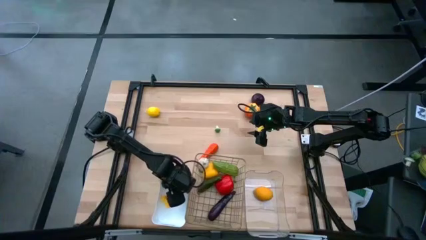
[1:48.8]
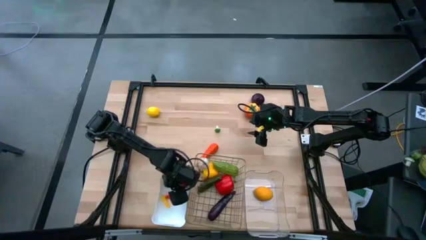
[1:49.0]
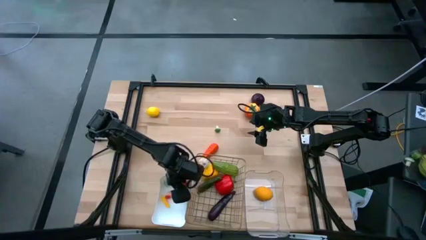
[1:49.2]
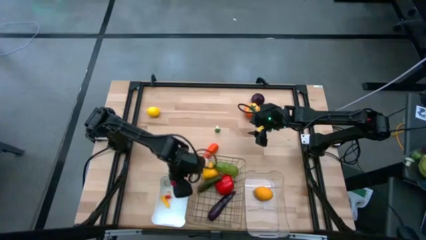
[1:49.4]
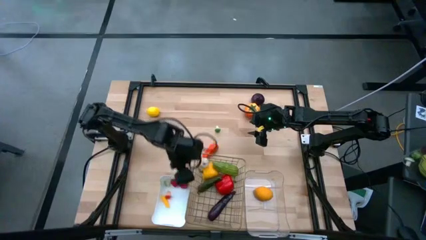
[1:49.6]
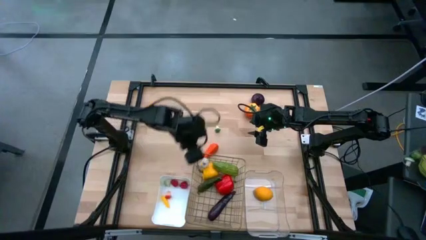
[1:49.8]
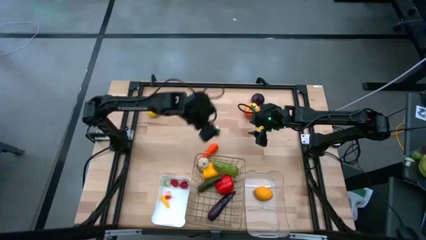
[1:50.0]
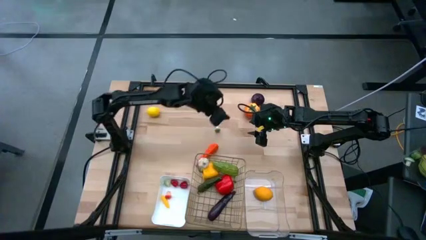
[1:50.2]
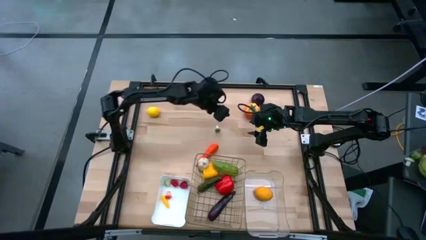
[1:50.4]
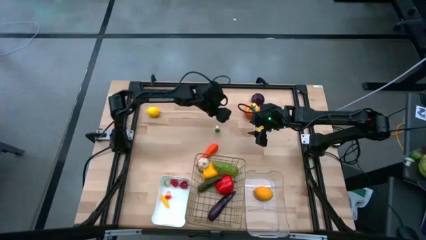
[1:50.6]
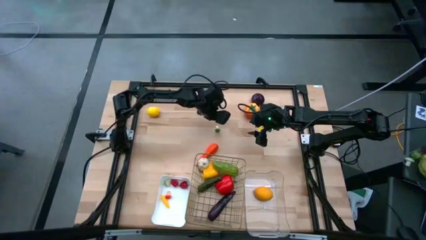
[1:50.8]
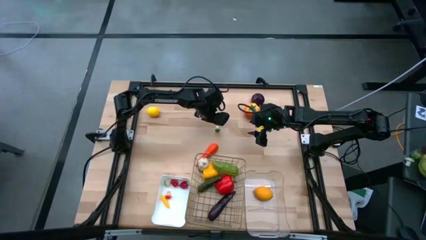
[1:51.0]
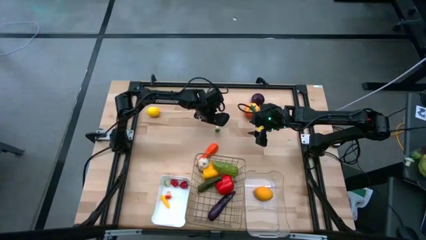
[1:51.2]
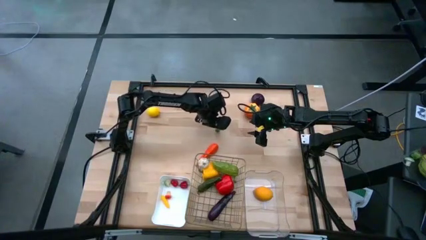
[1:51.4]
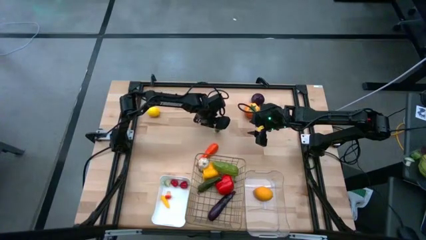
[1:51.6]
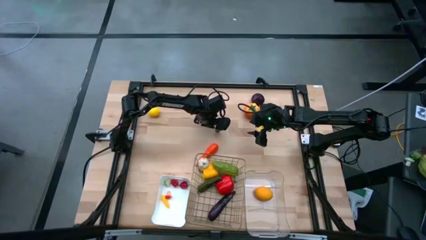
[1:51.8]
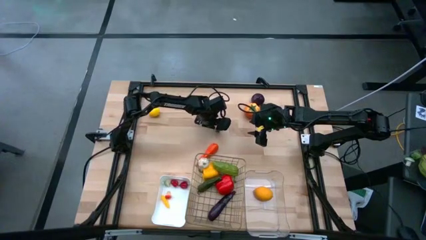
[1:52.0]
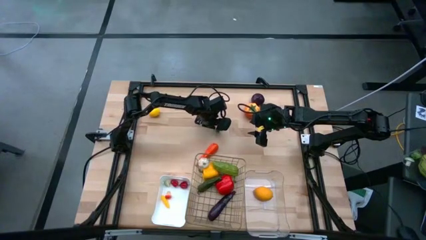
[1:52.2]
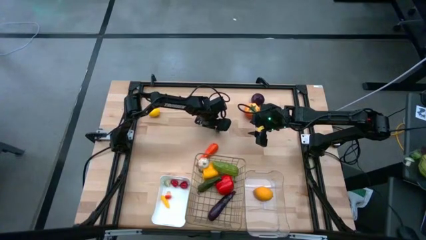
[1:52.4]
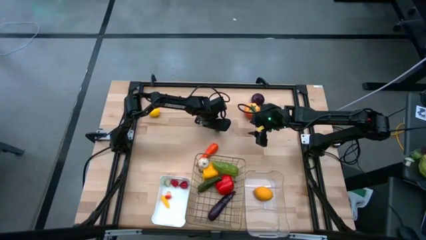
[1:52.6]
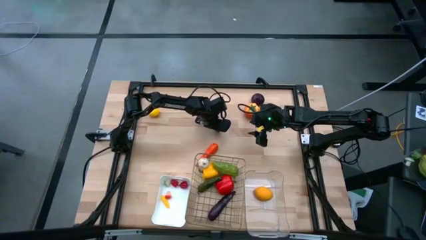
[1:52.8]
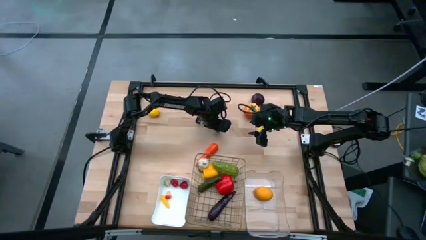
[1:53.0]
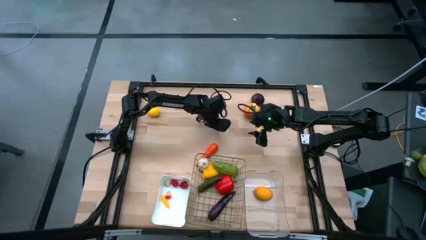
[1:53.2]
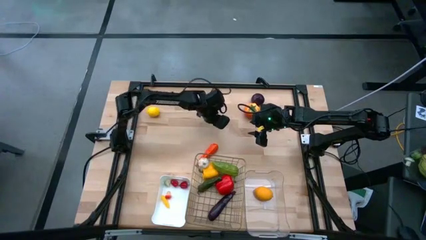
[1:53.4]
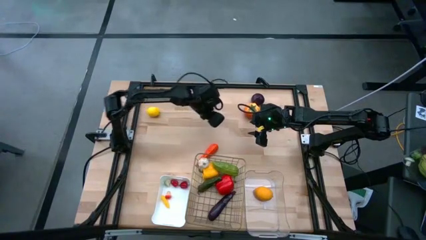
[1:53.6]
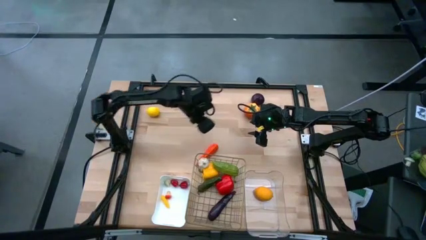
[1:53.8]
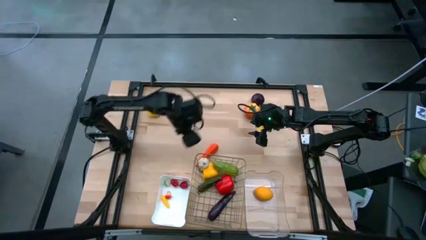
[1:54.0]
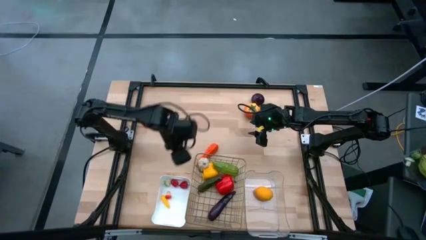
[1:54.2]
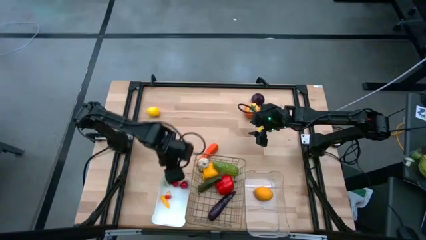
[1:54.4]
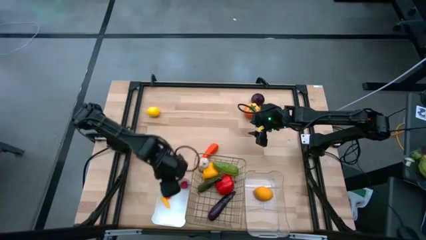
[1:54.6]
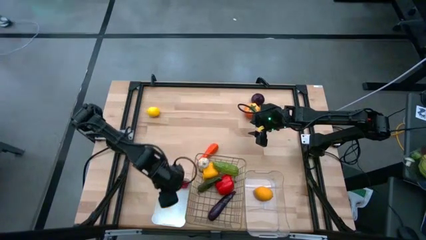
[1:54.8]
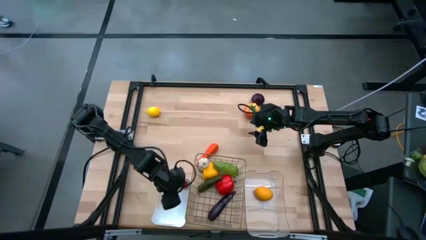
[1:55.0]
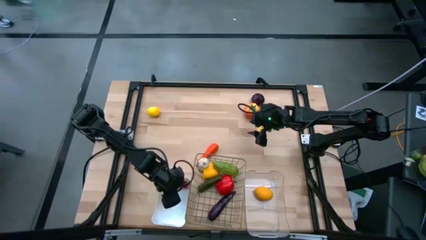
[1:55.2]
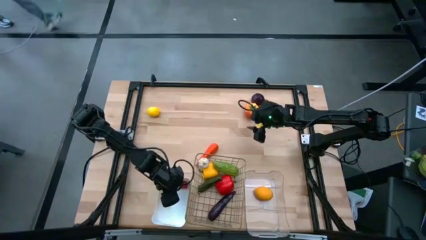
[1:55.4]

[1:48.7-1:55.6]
Task: Sort produce into baskets
Put the green mushroom into the white bin

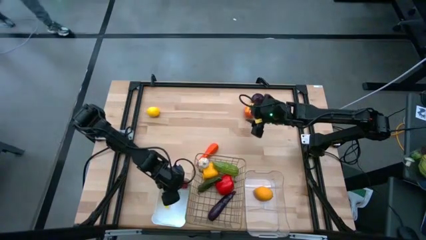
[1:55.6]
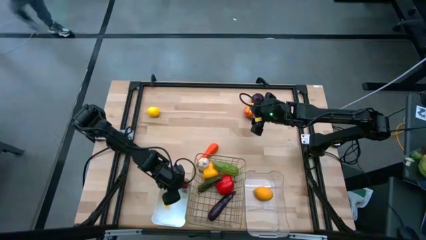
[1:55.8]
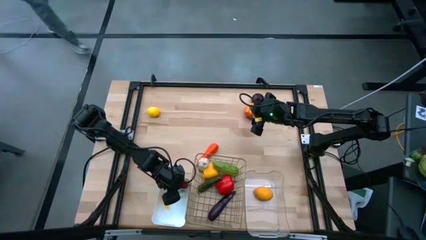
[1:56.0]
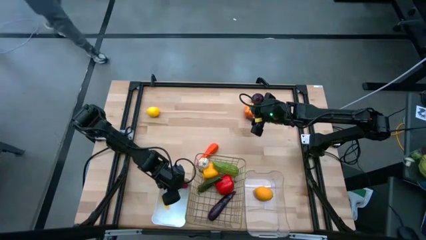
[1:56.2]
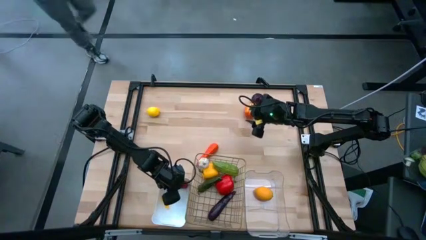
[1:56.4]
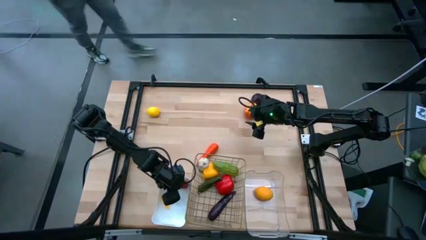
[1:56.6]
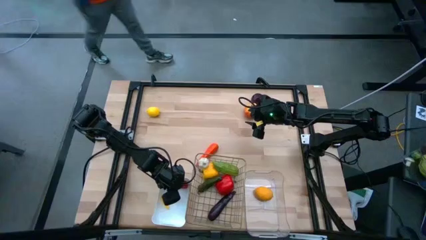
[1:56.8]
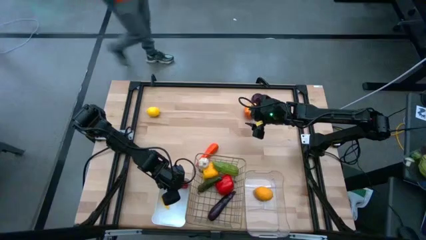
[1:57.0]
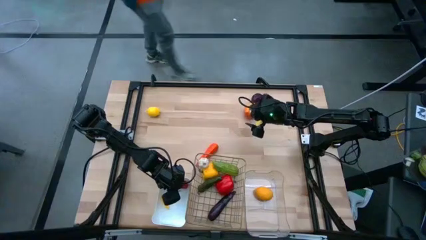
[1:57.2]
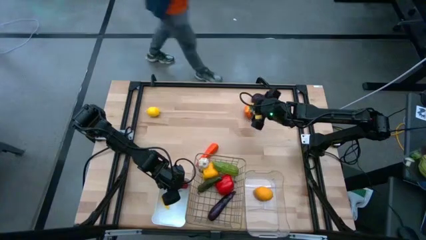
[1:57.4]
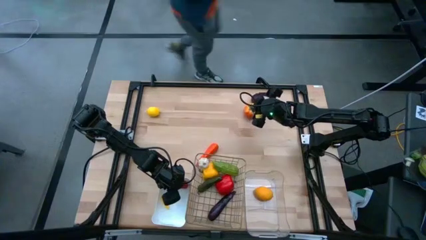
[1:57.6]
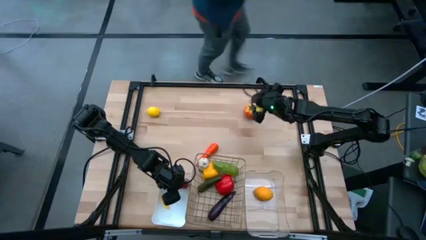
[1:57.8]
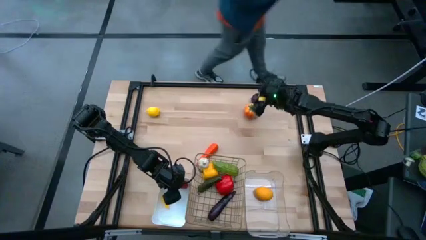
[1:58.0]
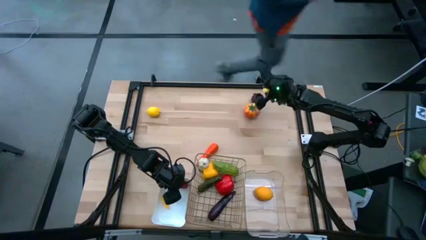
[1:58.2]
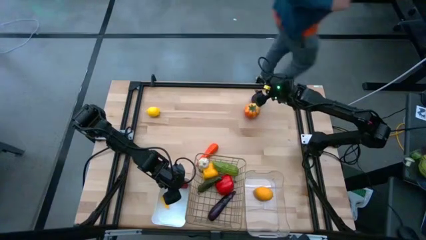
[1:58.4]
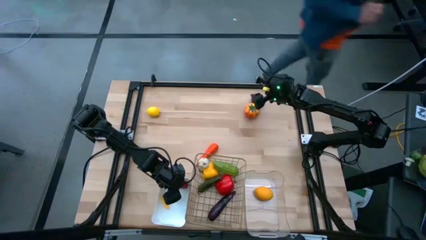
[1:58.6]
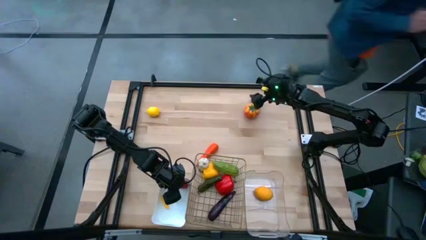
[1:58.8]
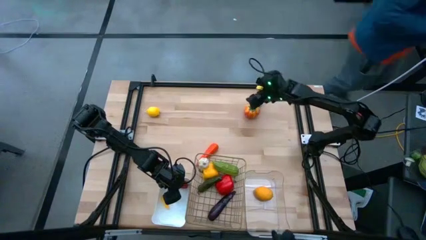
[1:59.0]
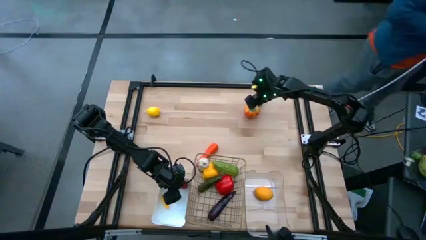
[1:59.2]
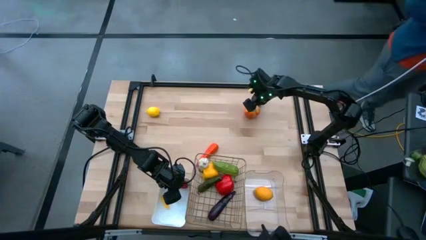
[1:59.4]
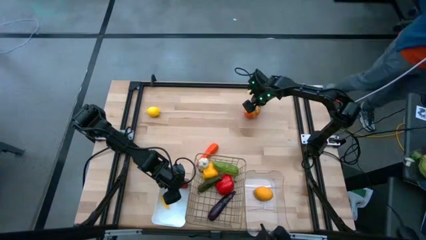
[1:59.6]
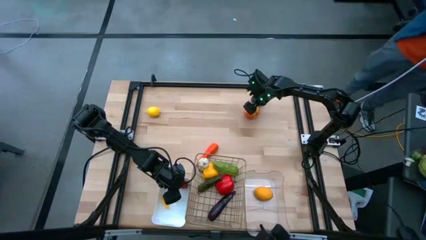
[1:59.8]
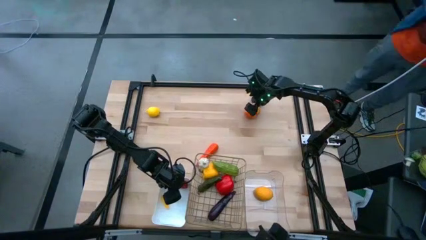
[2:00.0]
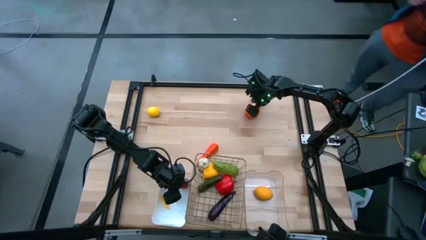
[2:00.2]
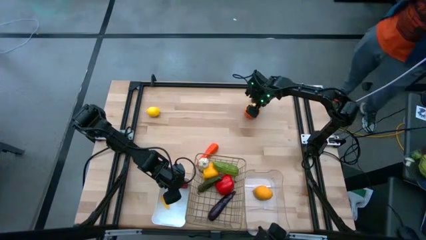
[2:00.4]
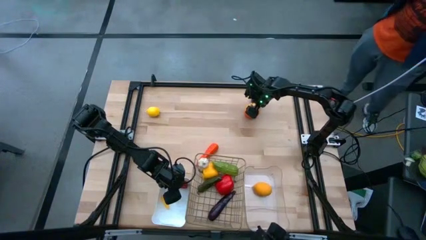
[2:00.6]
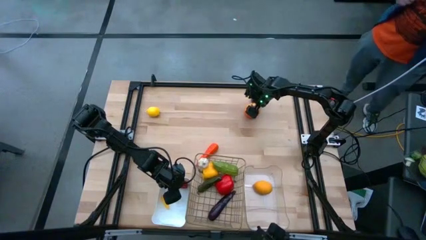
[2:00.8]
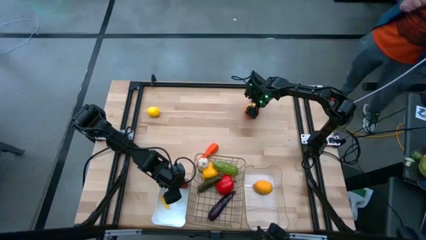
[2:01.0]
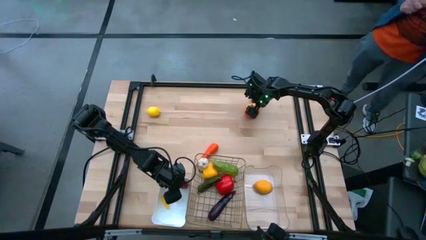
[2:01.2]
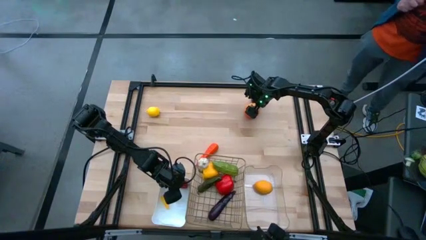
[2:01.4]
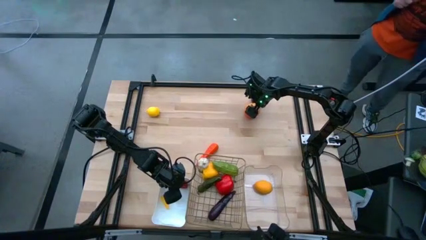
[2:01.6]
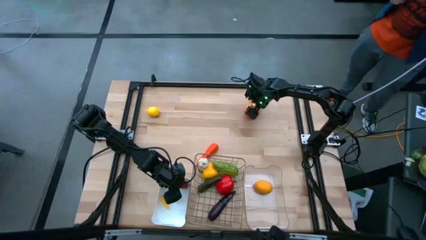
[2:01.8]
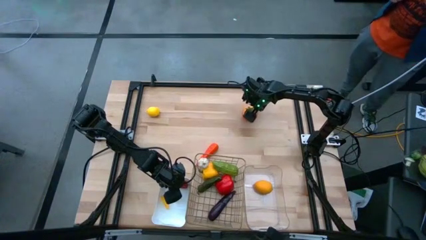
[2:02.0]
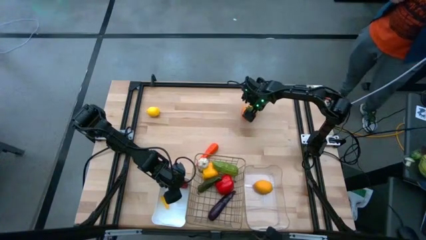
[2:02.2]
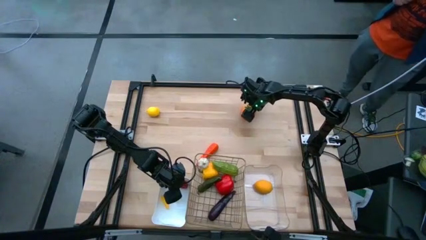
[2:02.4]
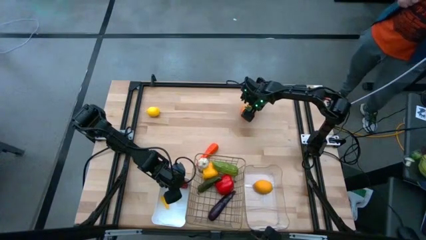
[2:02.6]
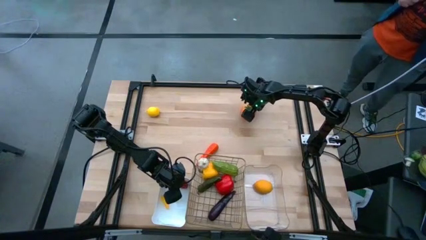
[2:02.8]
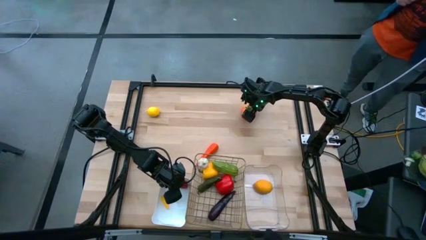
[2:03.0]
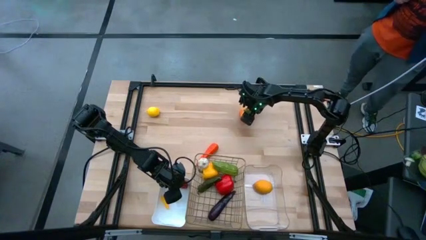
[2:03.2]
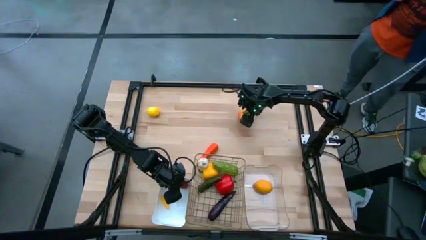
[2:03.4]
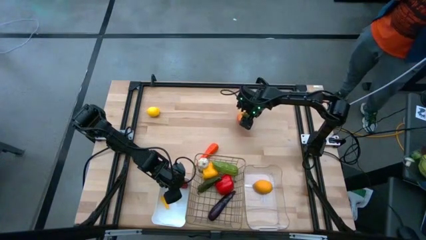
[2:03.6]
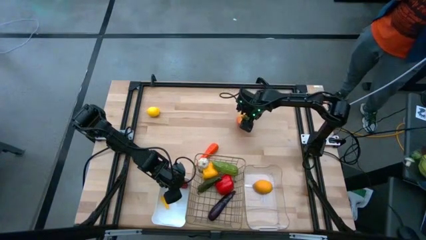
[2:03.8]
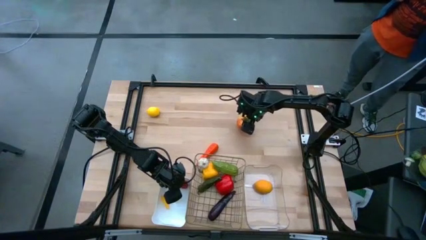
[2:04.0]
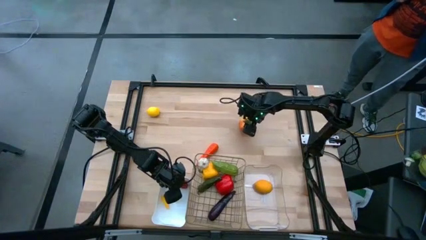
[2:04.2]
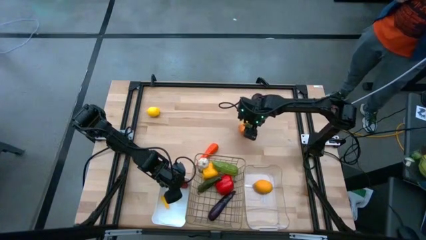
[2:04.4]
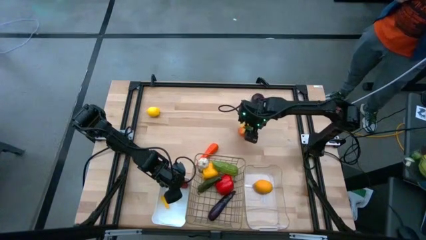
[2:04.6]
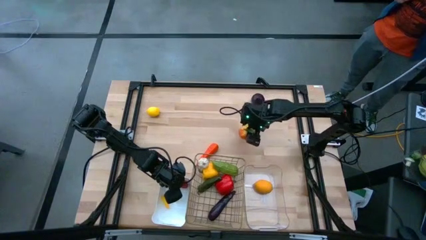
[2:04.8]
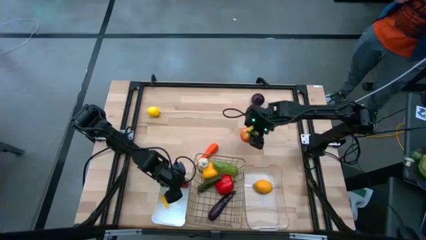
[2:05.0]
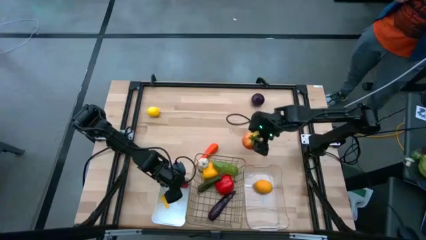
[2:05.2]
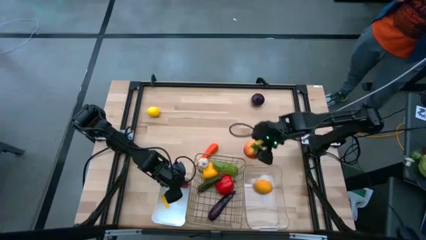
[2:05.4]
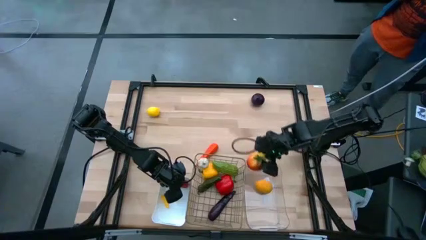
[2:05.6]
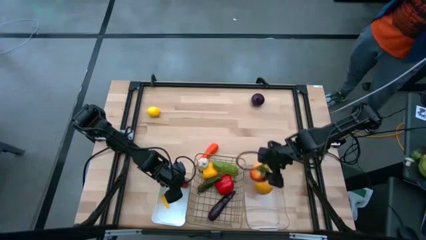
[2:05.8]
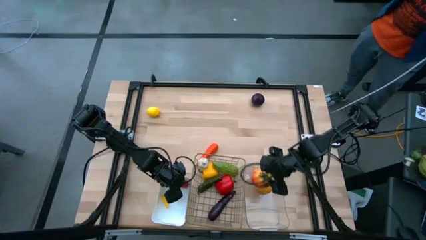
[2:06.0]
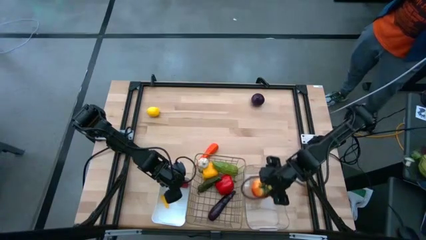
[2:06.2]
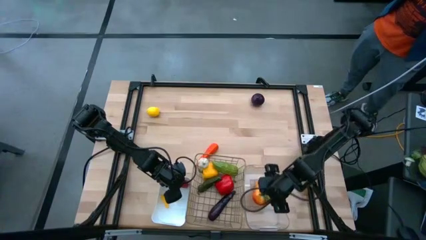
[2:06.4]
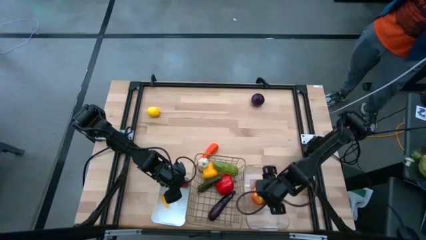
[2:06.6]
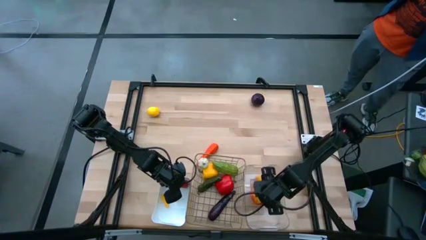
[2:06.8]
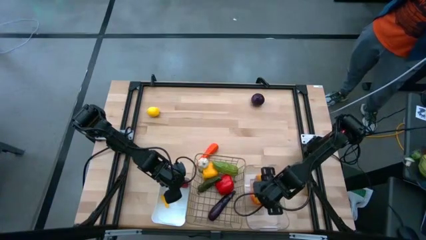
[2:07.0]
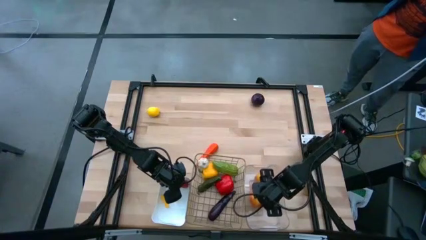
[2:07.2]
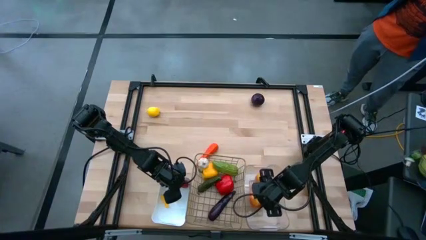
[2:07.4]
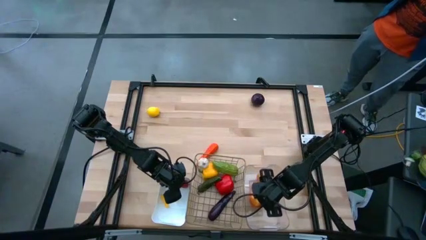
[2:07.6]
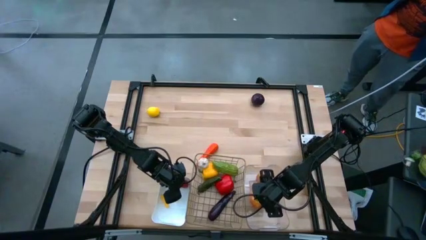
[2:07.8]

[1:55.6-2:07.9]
Put the yellow tomato into the transparent bin
